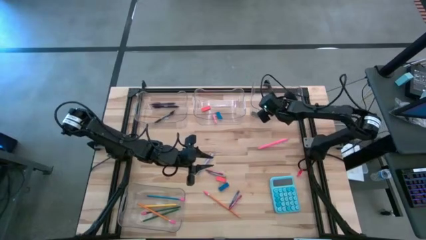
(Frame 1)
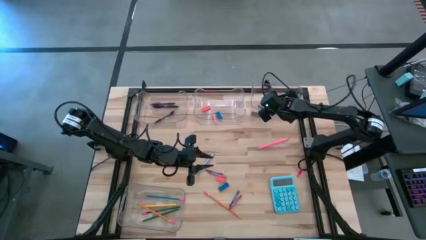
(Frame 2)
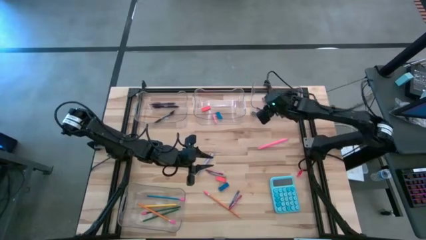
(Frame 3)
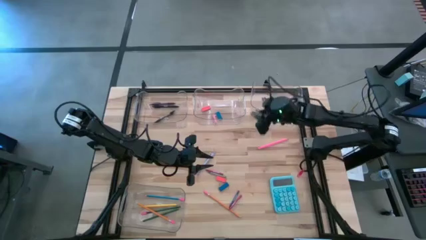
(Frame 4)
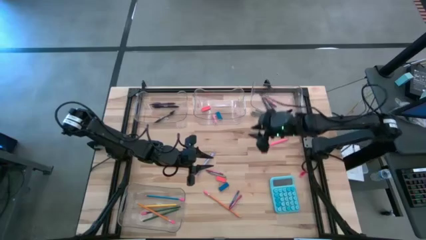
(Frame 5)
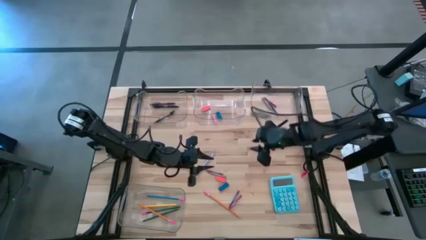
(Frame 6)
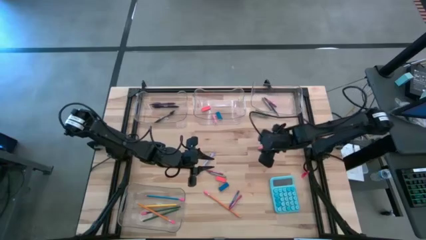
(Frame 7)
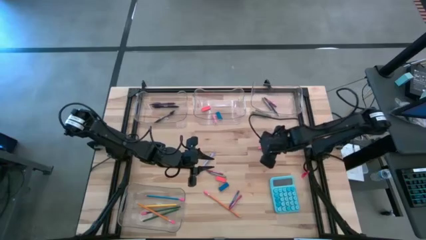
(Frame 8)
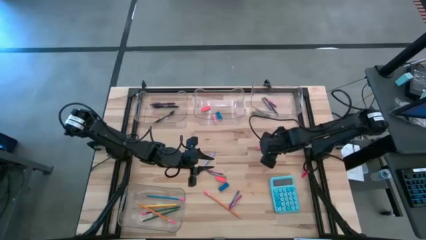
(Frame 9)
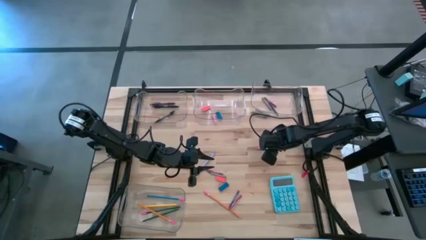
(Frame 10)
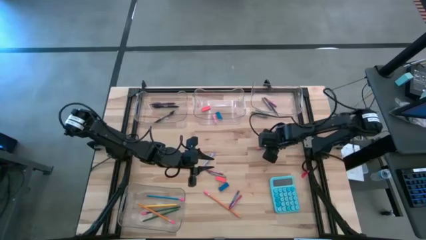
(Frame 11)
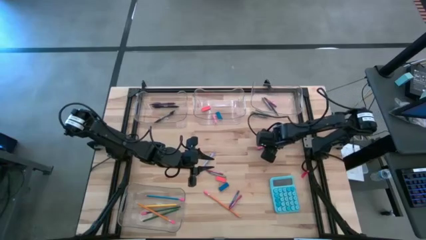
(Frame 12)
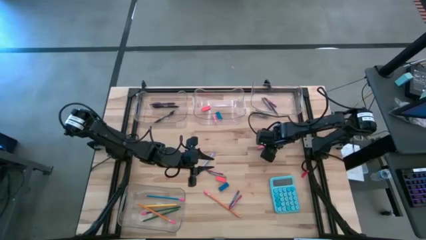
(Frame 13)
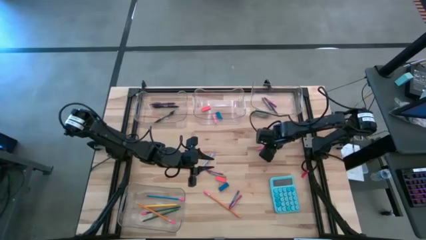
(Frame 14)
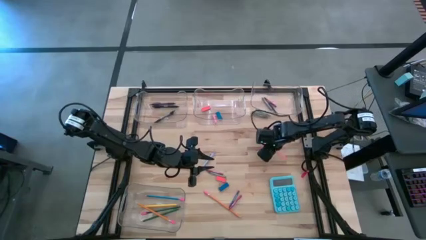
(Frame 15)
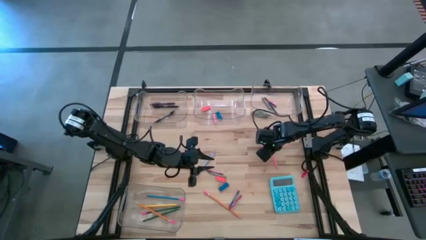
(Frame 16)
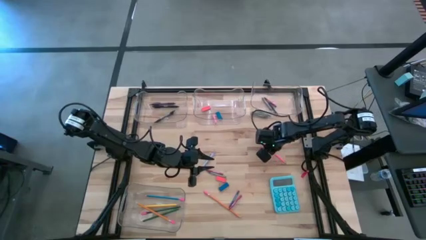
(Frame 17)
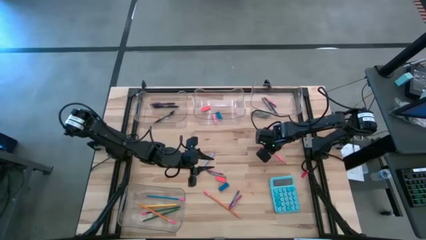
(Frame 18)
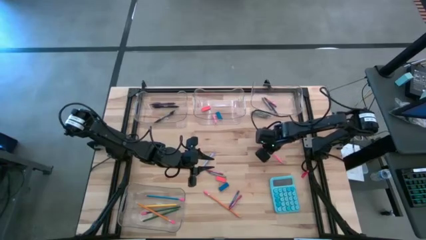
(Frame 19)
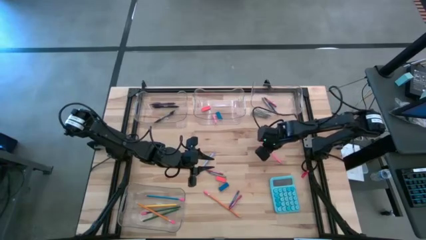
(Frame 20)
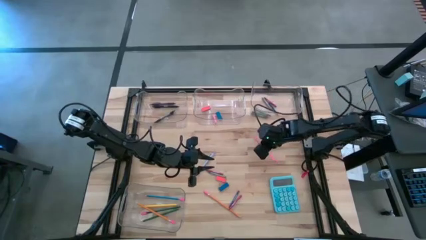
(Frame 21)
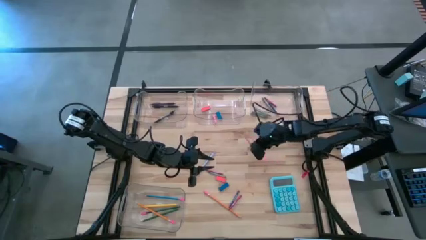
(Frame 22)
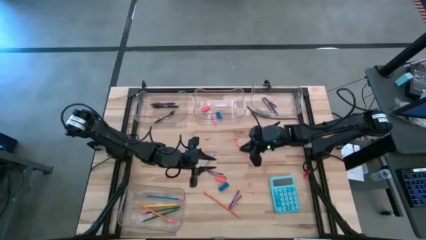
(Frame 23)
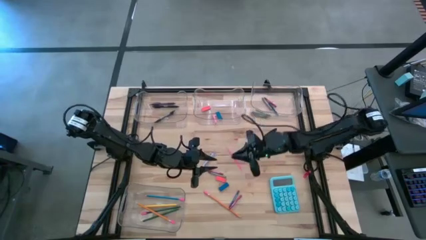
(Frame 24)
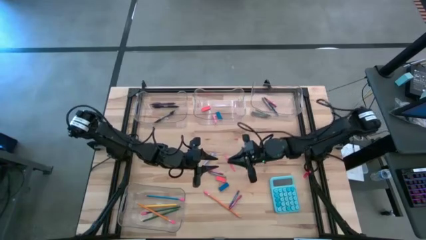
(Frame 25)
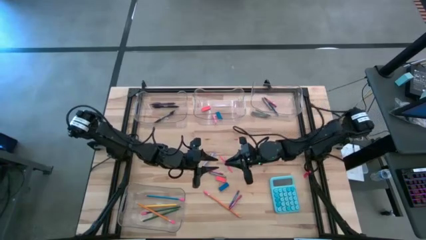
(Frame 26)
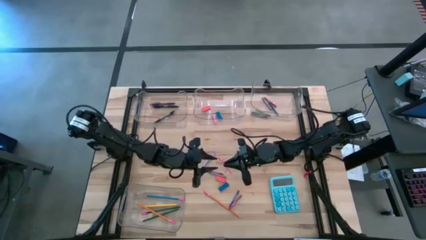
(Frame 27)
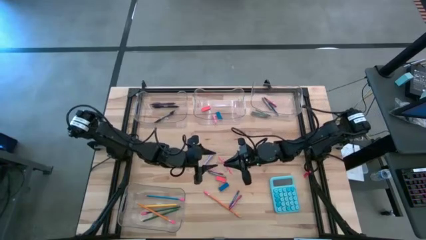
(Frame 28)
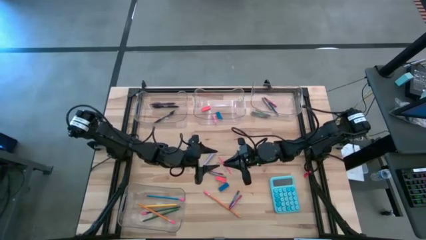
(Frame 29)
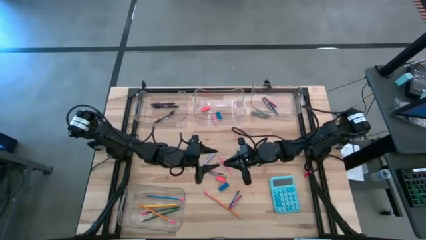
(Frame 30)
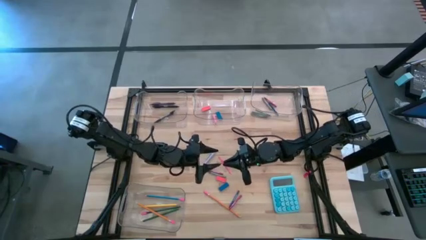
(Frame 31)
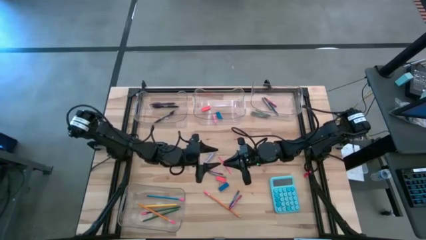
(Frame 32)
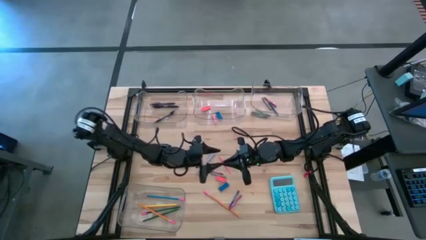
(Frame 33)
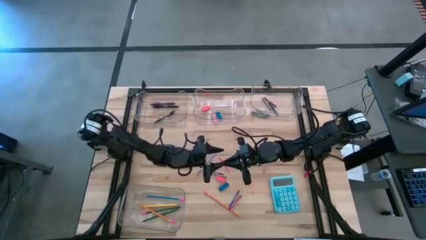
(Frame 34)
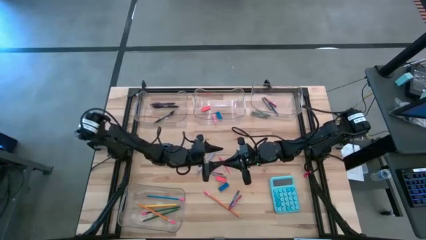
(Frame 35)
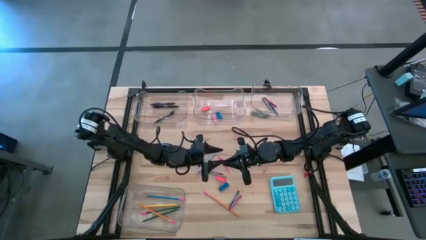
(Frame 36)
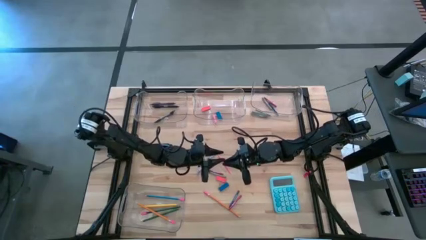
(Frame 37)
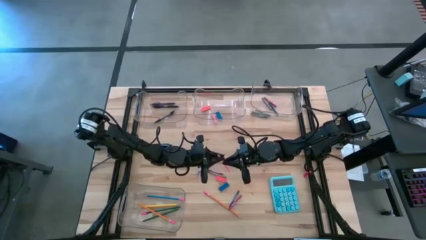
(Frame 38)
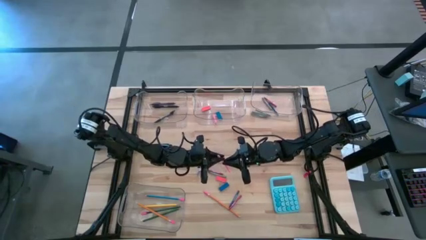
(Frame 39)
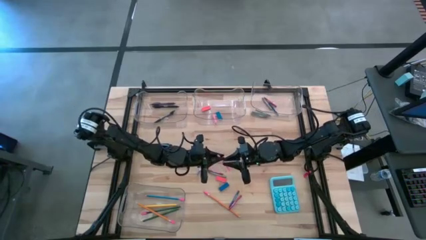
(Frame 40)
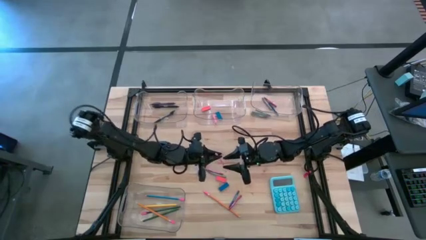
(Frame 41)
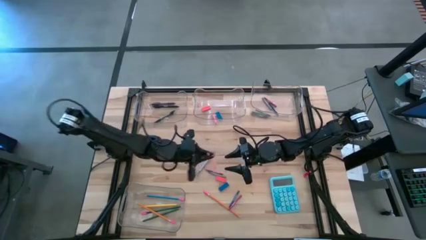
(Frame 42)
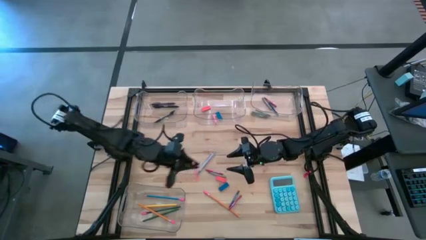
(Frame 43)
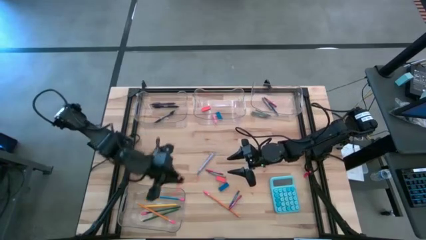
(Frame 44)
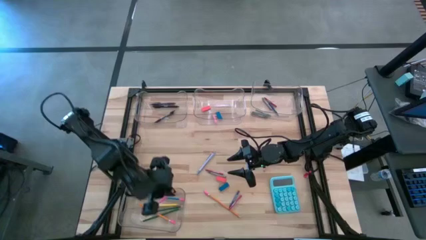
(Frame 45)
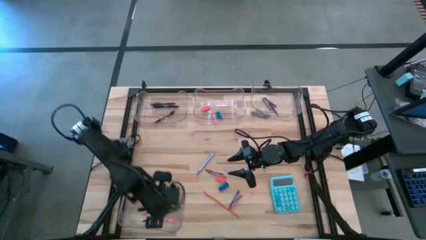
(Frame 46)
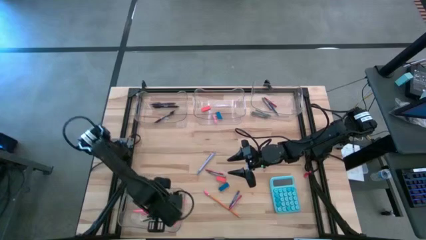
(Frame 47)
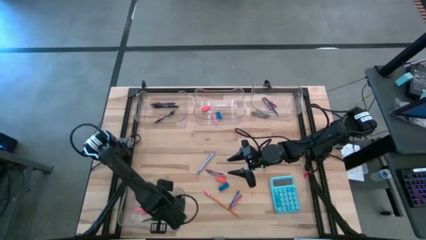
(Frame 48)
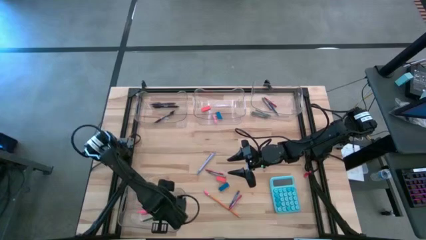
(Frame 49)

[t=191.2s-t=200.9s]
Task: Sort crayons/erasers/pens/pencils in bins
Put the pink pencil into the bottom transparent bin

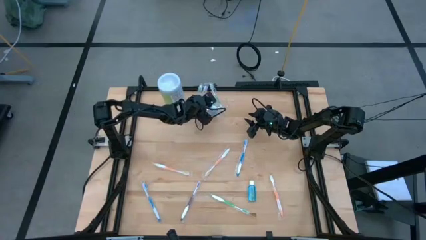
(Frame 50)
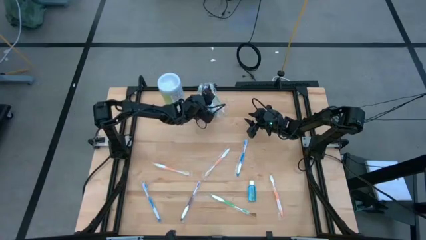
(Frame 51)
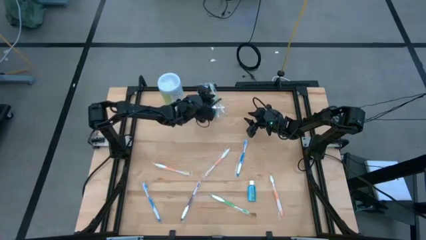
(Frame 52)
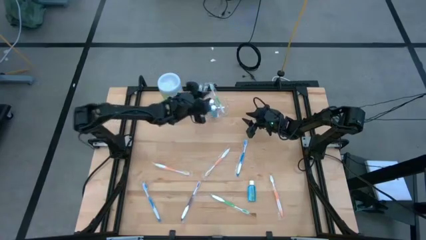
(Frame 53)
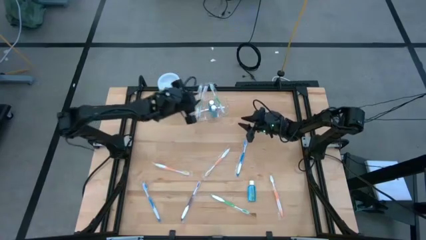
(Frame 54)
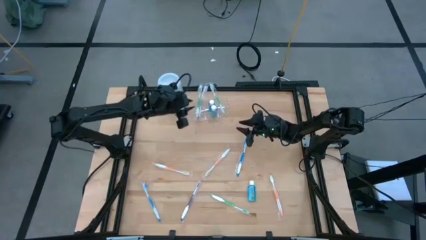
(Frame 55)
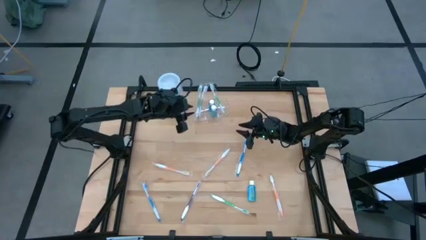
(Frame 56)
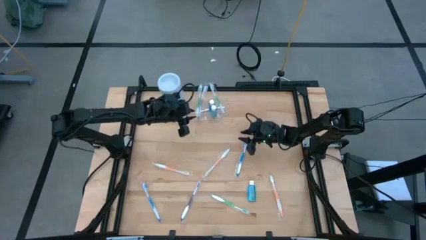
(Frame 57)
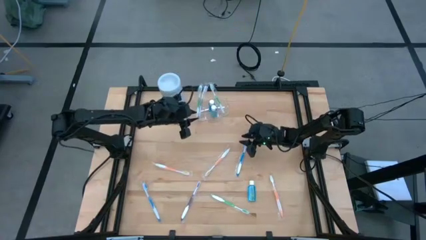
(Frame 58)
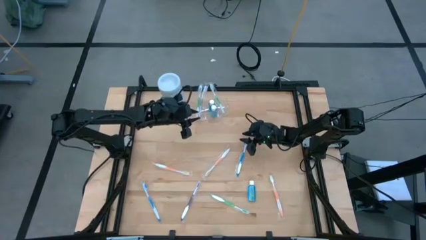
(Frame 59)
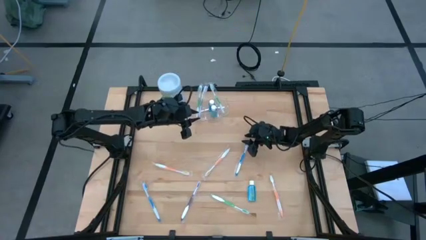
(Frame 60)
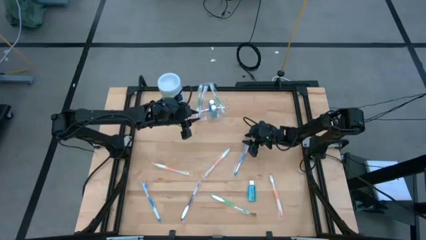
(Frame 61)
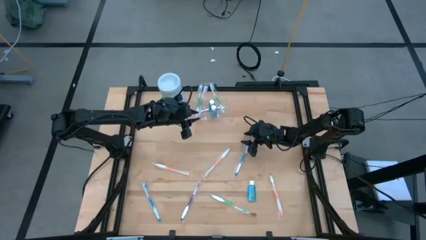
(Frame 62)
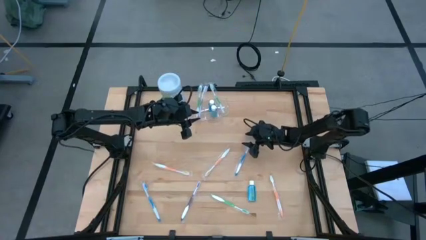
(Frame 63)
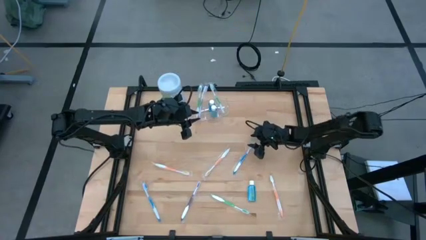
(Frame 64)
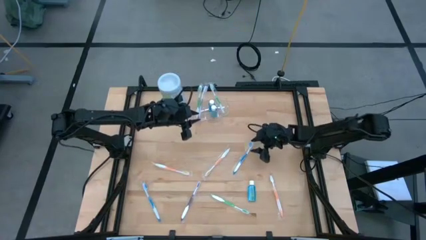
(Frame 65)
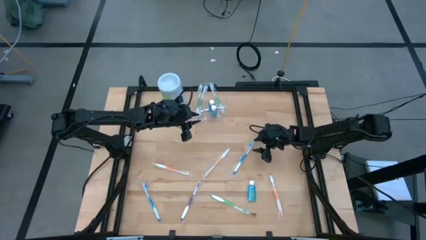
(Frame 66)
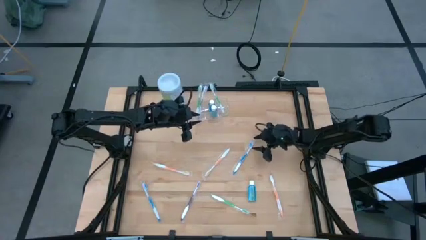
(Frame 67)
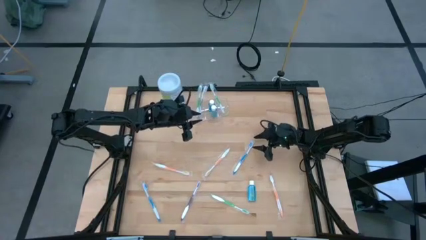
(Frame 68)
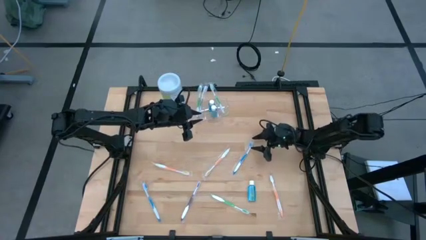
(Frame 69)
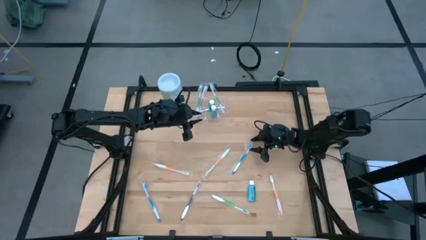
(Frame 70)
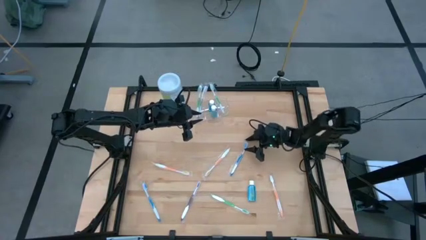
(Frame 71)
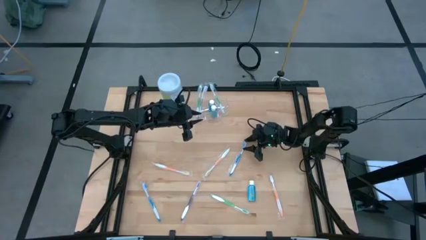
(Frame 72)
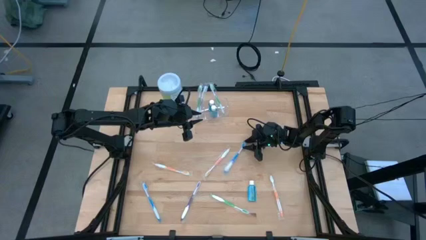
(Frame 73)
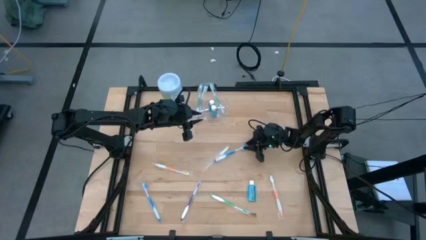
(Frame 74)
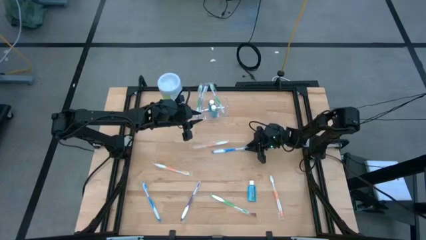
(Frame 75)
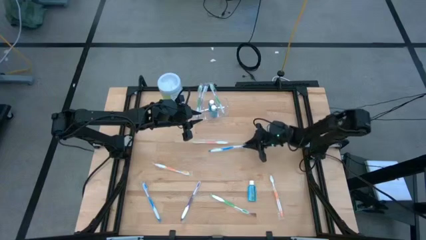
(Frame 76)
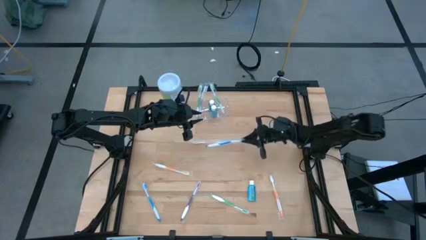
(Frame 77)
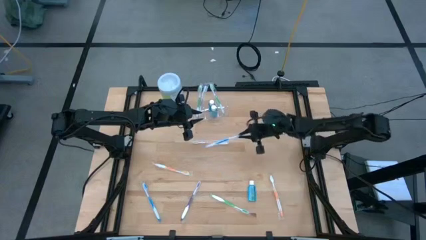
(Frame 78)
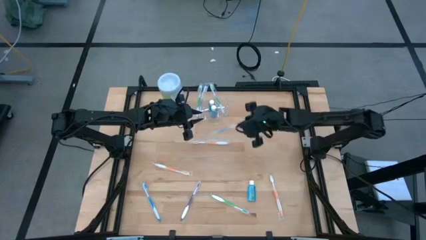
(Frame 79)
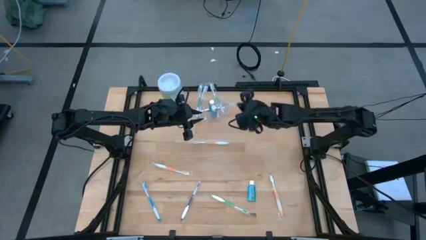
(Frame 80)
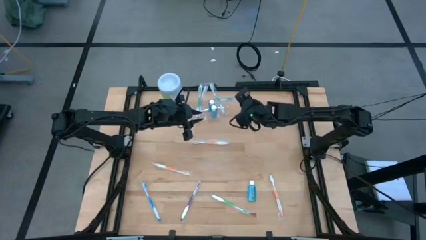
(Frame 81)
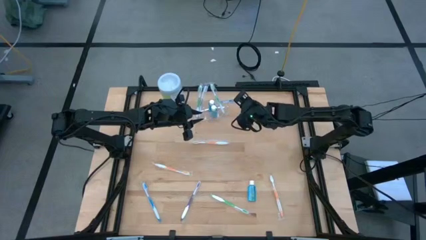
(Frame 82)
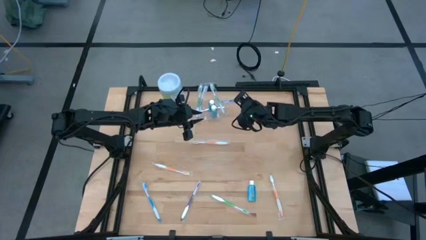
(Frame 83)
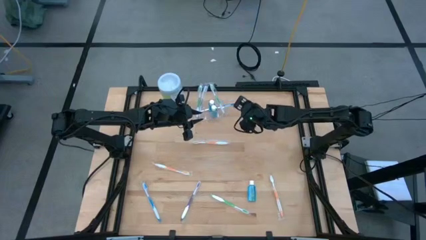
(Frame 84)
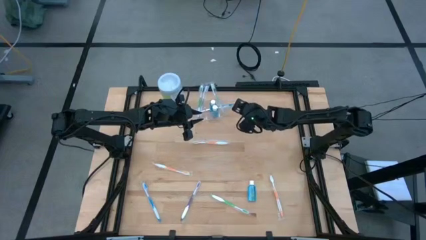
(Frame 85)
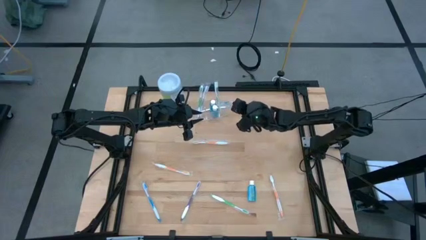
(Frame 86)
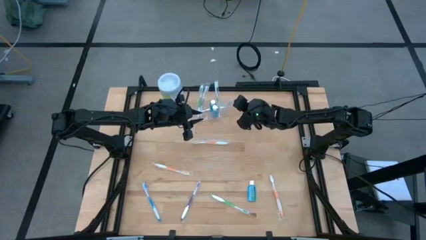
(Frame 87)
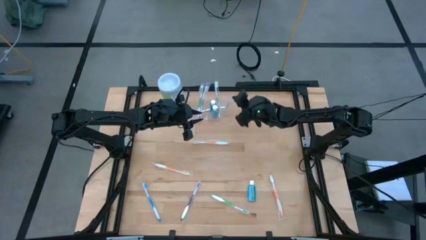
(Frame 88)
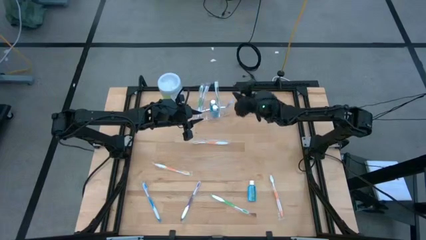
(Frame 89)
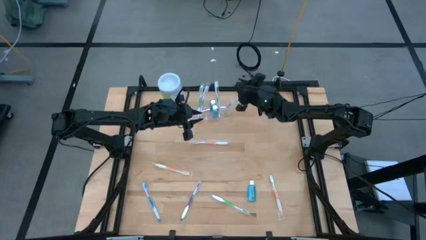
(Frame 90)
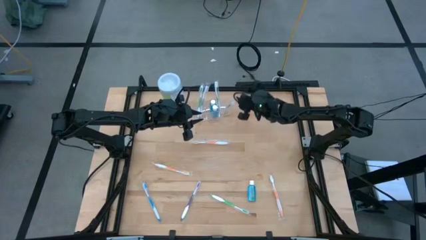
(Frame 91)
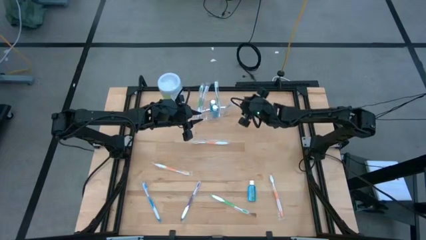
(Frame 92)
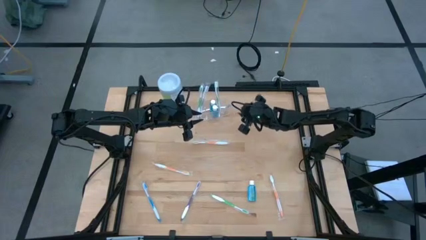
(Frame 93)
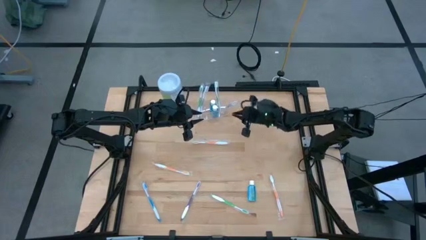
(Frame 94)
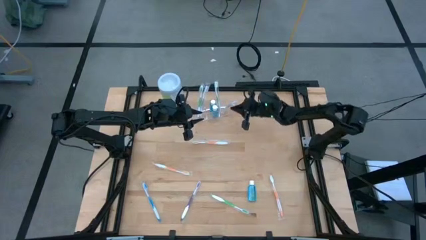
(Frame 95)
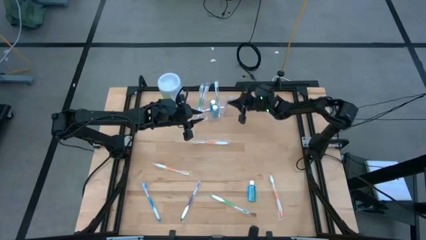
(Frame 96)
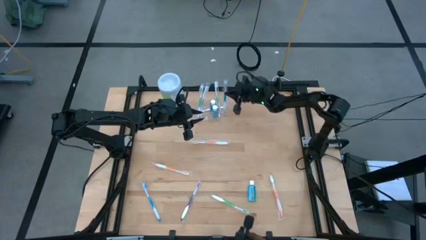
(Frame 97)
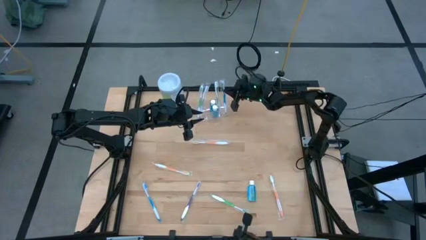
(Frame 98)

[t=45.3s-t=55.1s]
Task: Pick & Place toothbrushing station
Put the top blue toothbrush into the transparent organizer
